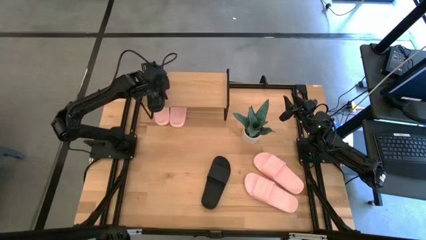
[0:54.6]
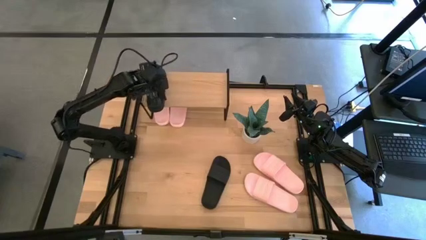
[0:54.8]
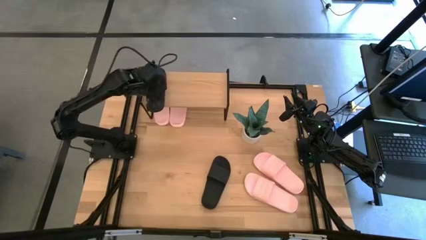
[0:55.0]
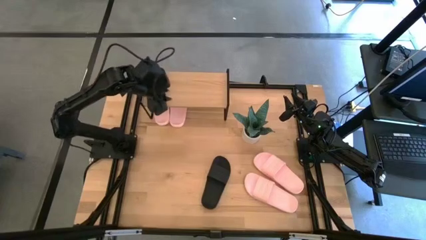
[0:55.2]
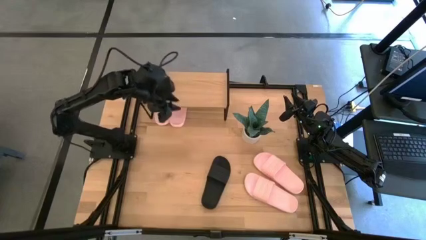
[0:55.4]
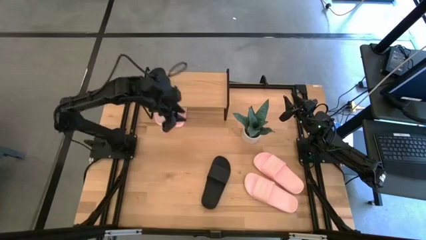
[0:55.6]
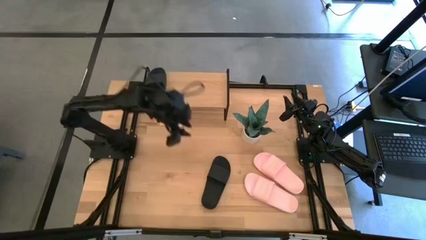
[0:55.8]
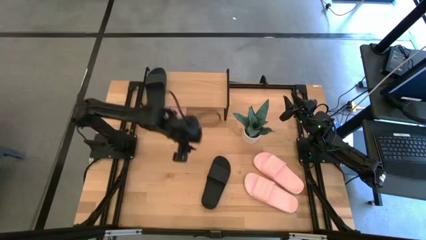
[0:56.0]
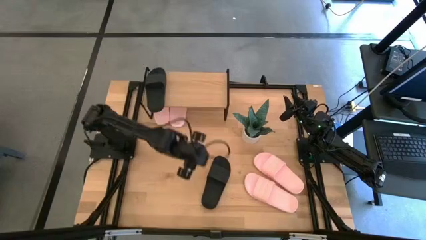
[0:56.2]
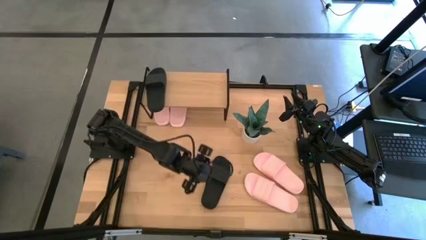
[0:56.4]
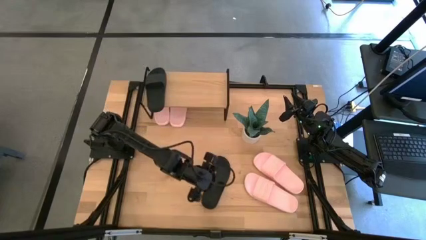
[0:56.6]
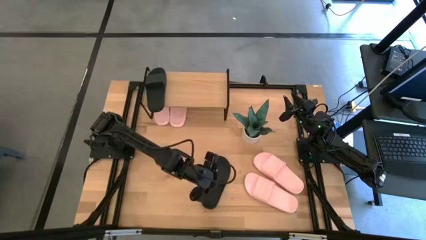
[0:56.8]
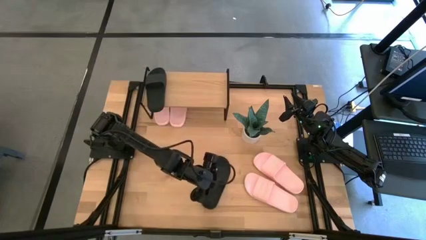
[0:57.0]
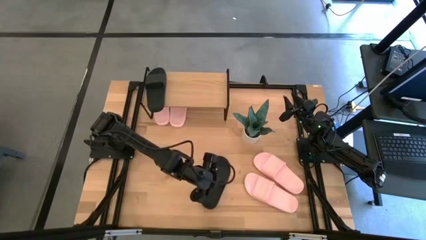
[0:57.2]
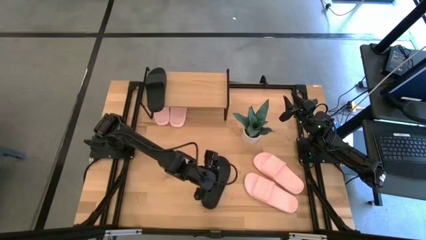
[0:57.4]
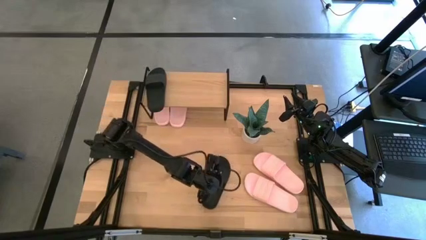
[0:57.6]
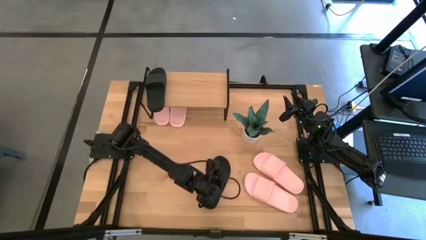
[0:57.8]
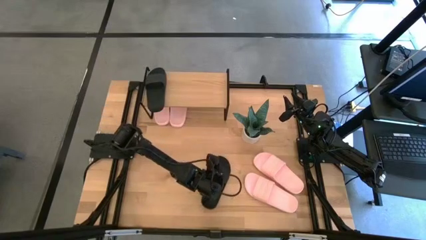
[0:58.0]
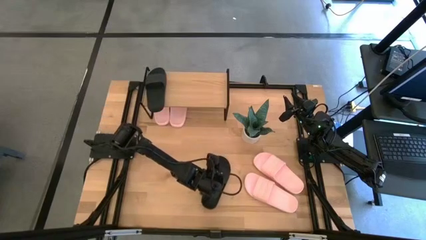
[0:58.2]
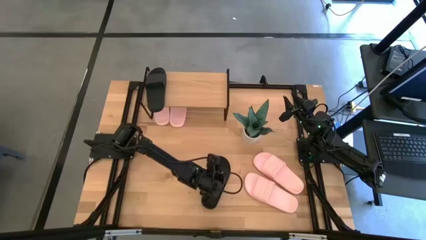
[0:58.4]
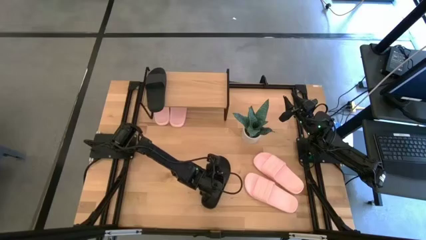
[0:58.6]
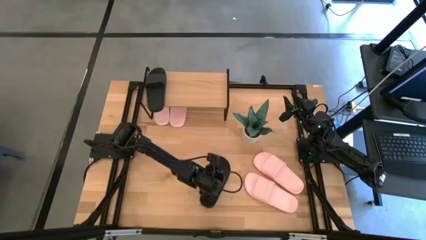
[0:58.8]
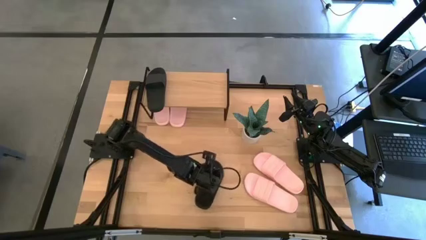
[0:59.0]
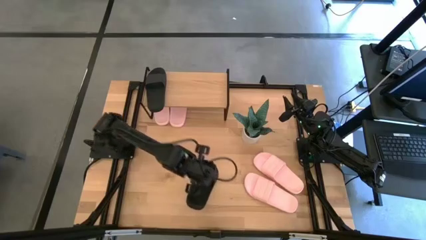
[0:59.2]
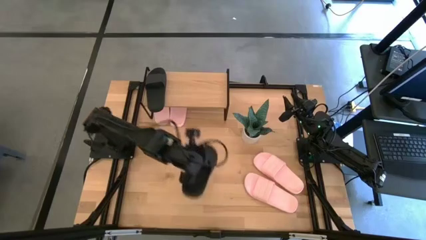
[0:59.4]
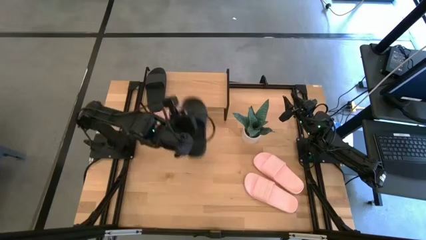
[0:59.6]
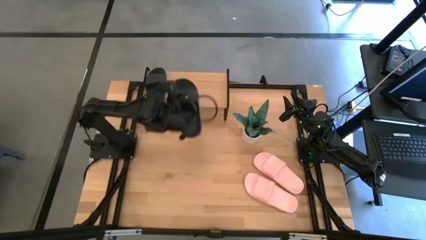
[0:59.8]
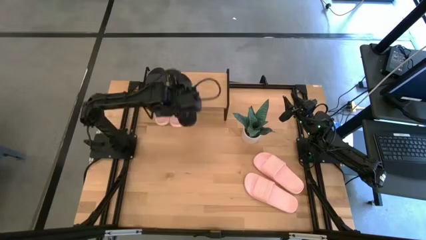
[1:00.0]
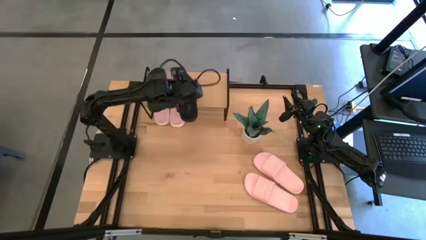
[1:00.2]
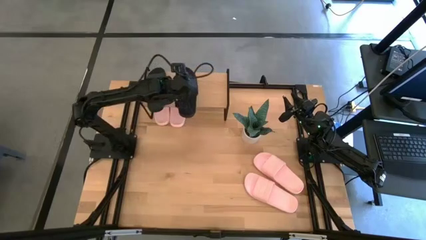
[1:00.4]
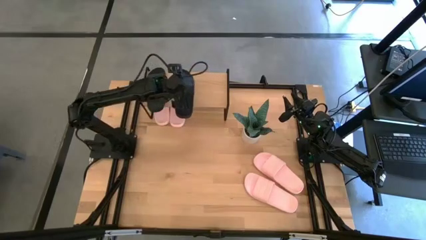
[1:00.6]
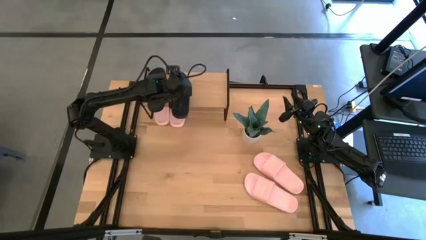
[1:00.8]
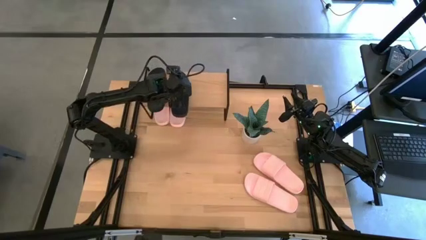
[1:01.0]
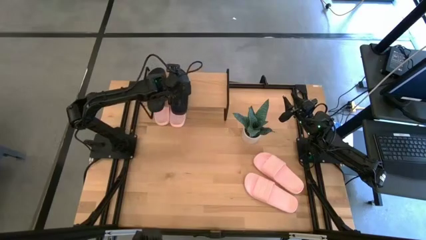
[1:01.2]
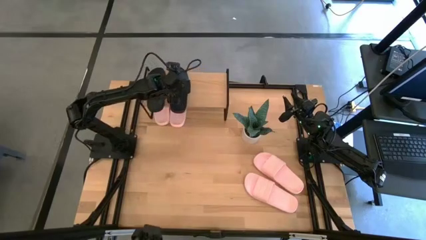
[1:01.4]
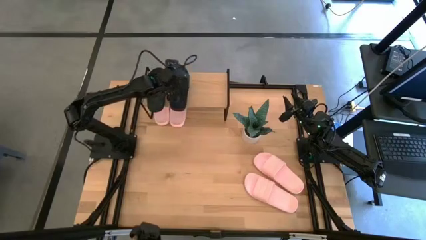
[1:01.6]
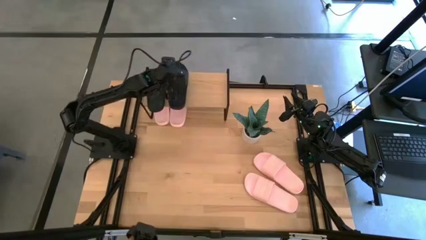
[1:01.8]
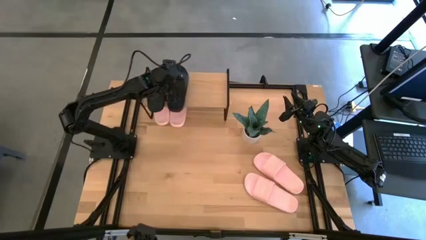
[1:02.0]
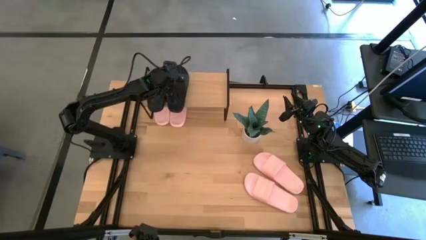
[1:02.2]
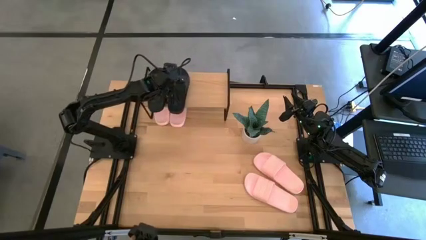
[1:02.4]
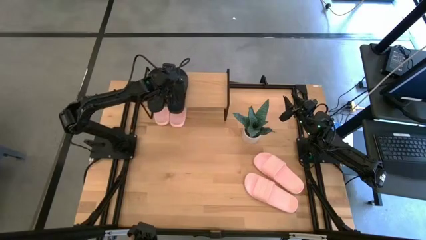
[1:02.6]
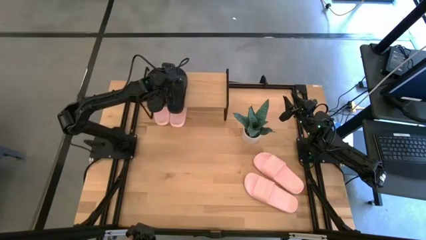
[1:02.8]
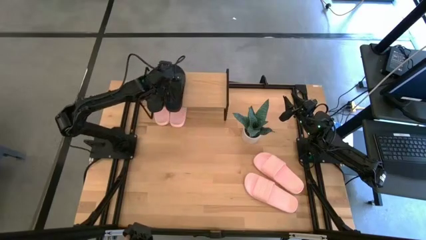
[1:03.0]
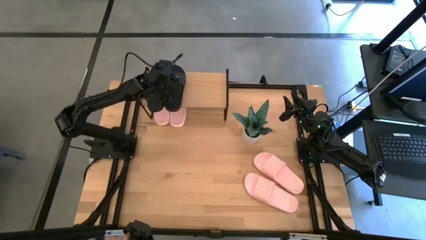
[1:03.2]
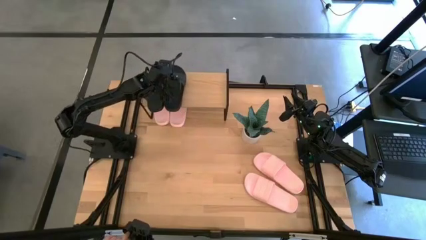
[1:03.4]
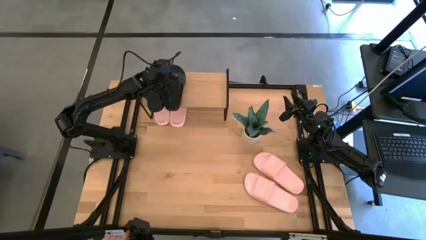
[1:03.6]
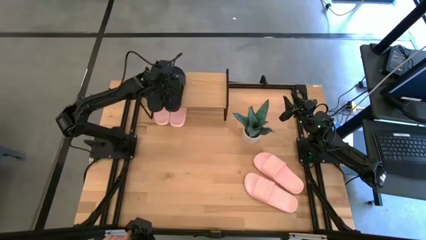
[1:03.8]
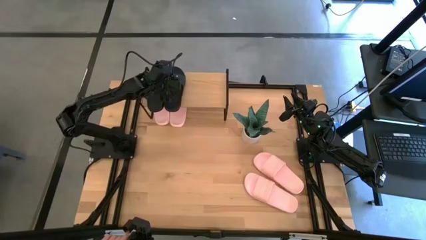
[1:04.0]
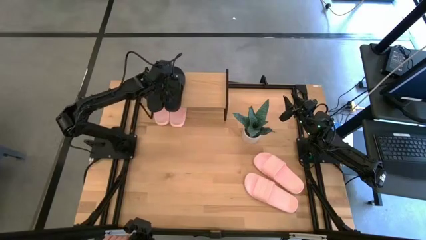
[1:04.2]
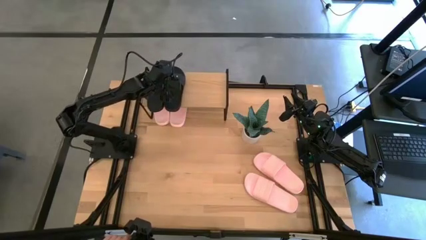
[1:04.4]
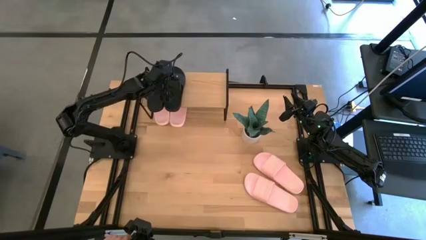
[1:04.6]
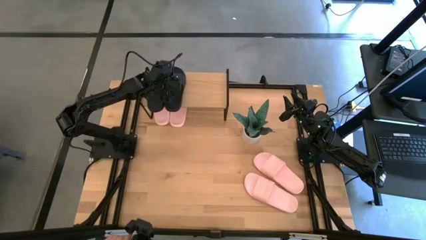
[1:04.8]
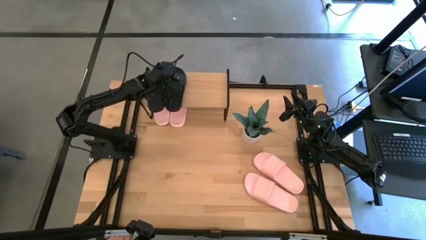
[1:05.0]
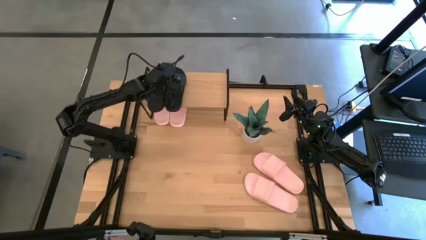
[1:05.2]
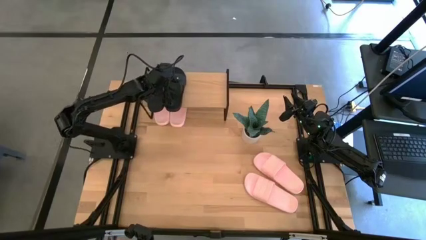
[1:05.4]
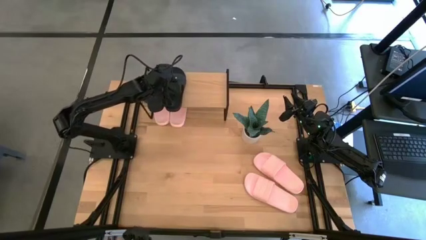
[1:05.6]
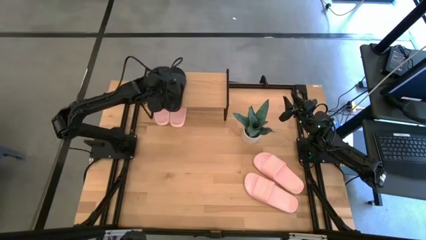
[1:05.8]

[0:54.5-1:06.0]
Task: Pick and place slides into the shelf
Put the black slipper on the shelf

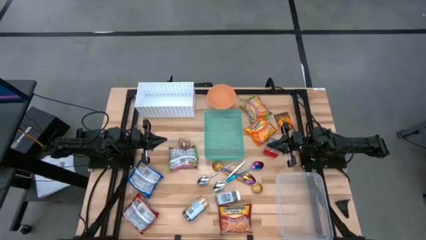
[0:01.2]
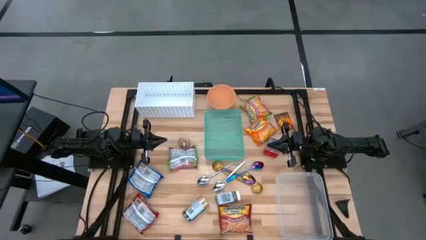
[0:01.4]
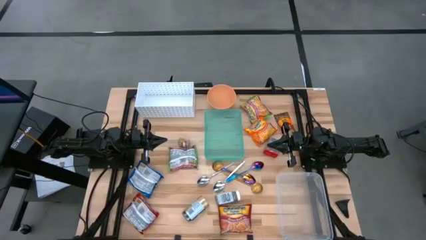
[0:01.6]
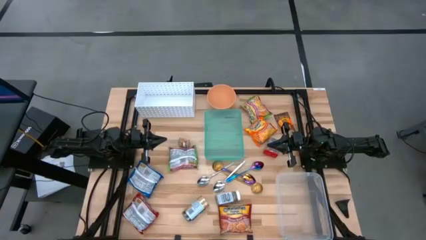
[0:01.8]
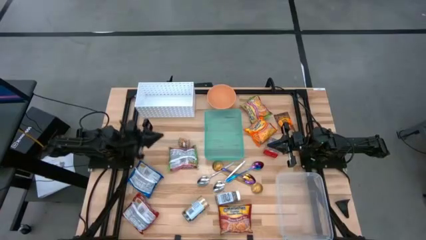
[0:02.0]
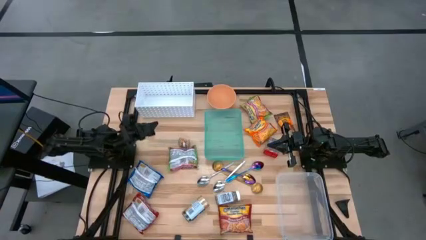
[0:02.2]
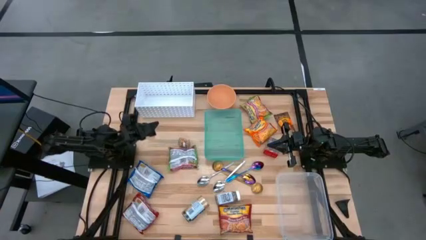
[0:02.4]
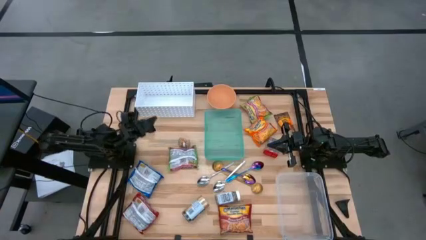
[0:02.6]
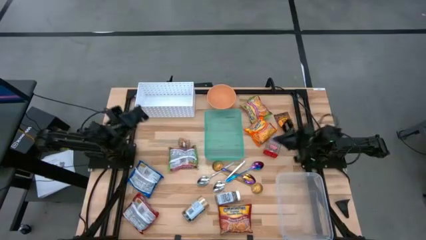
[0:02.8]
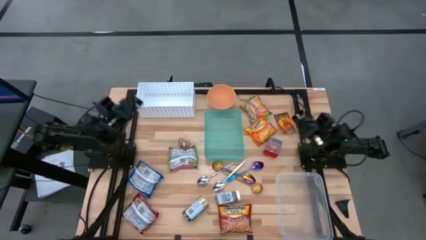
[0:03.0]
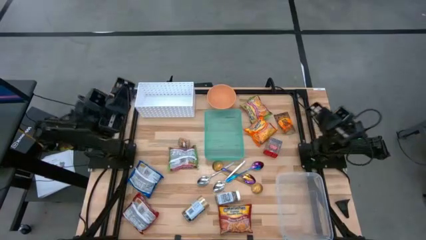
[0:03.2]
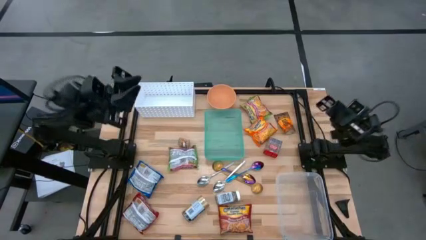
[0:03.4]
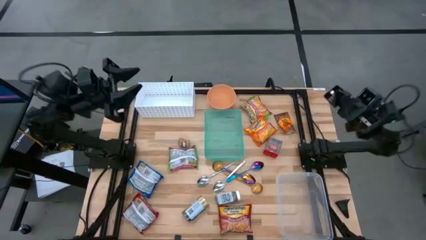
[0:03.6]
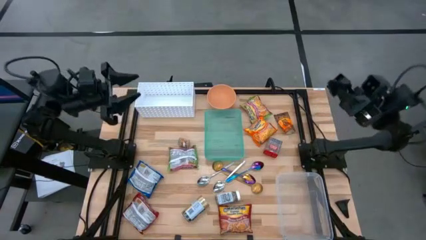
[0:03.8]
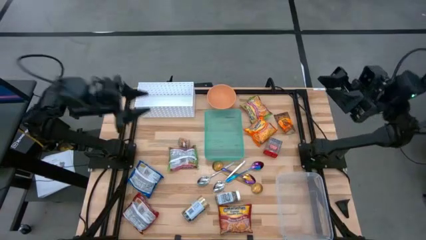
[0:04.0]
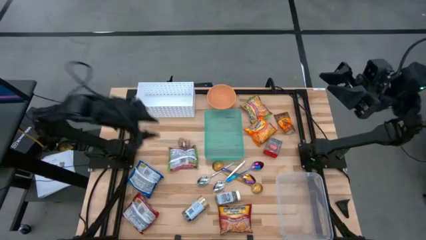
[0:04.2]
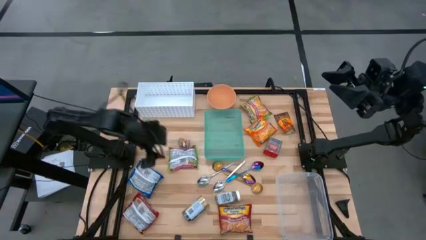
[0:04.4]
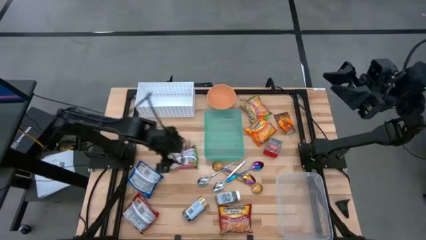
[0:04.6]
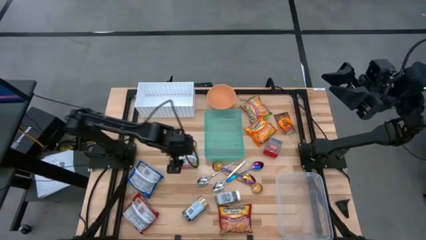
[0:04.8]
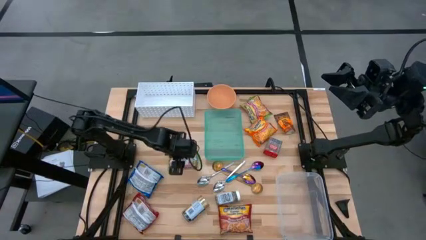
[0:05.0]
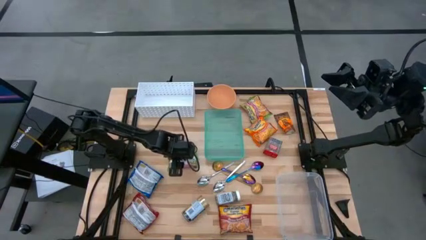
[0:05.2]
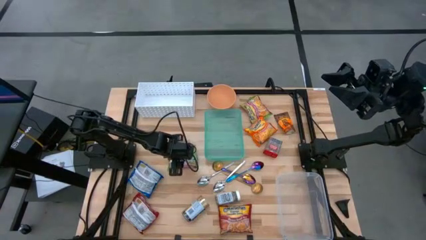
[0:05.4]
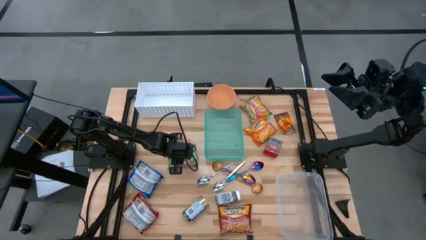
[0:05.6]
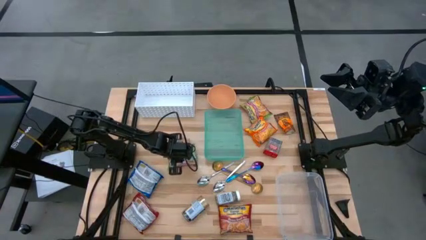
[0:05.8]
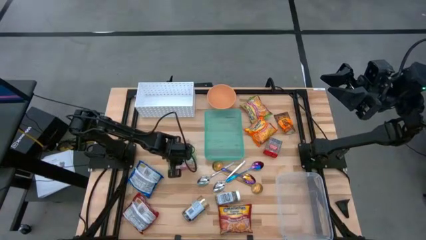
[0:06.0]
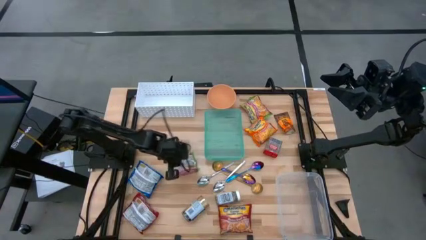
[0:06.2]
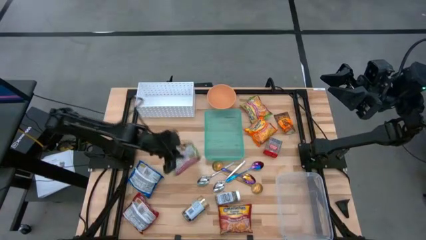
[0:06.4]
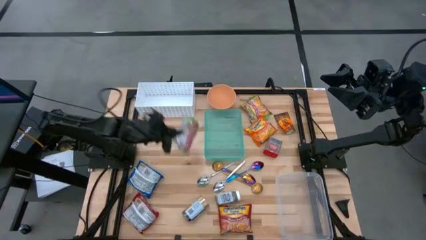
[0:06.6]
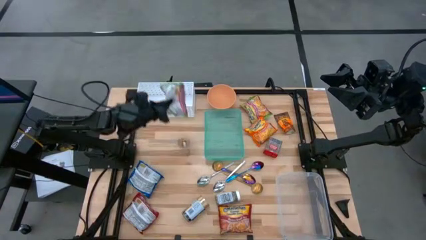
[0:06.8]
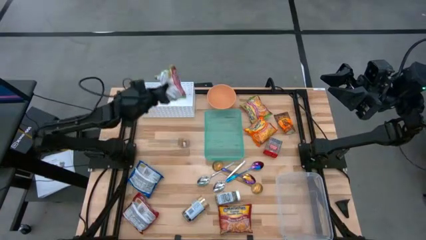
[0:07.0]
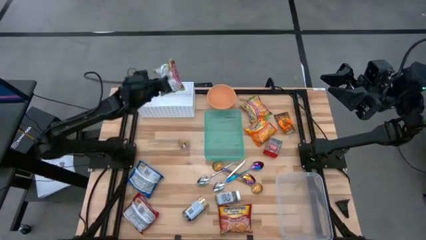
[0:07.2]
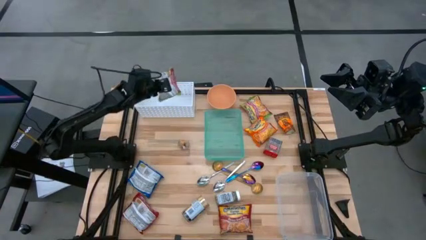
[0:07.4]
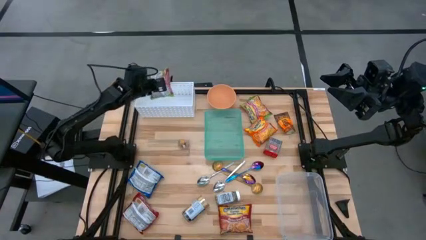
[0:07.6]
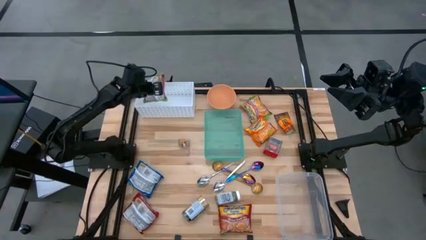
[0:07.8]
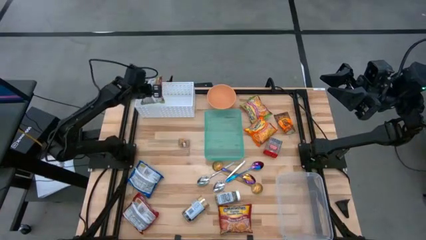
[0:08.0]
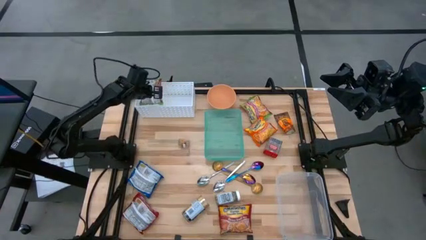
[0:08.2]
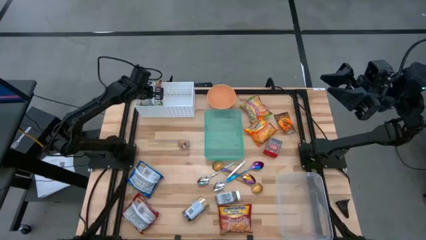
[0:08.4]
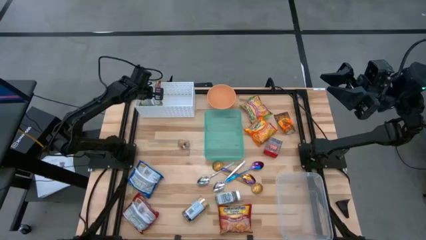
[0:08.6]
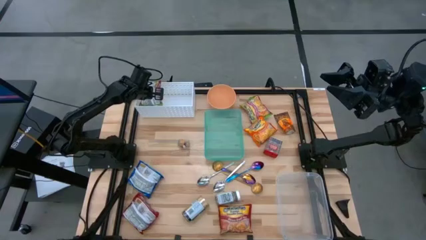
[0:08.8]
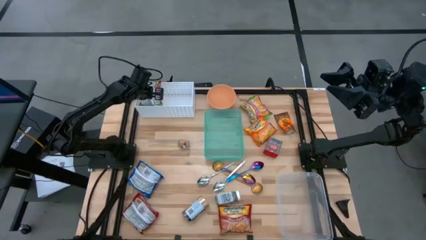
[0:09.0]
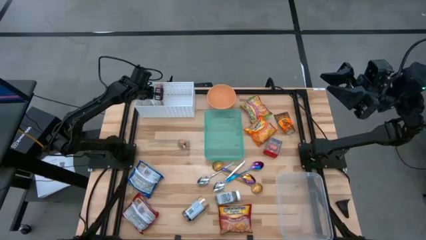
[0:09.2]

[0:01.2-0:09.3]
Task: Pick & Place Food Item
Put the left green noodles pack into the white bin
